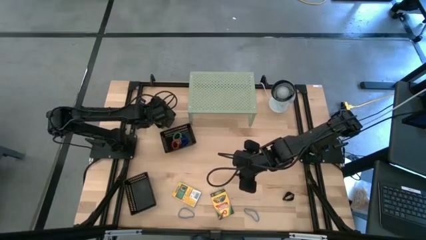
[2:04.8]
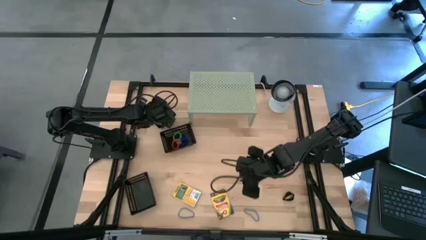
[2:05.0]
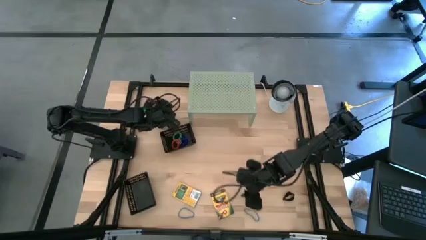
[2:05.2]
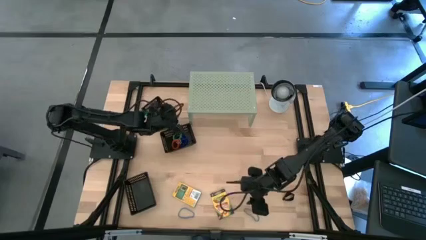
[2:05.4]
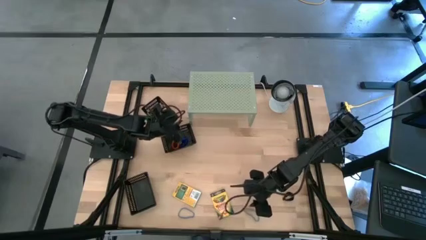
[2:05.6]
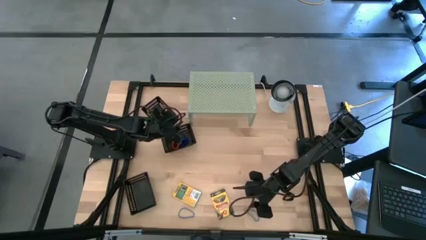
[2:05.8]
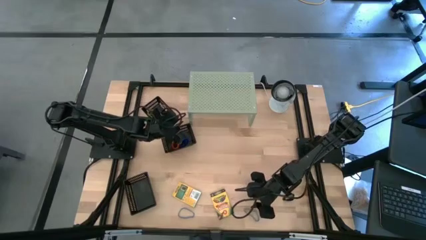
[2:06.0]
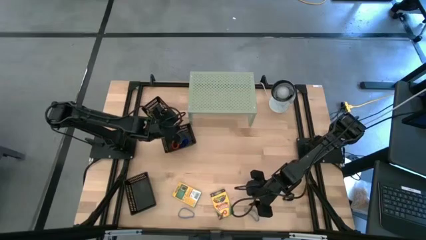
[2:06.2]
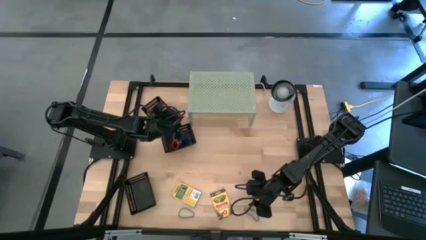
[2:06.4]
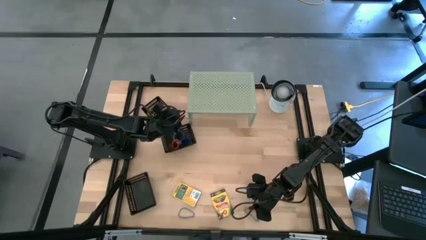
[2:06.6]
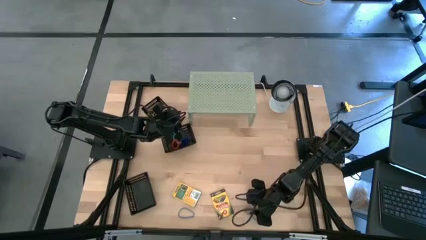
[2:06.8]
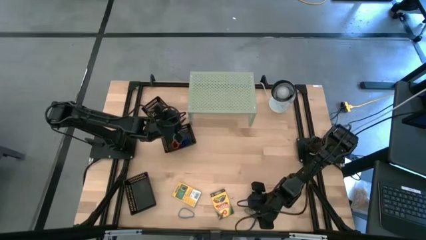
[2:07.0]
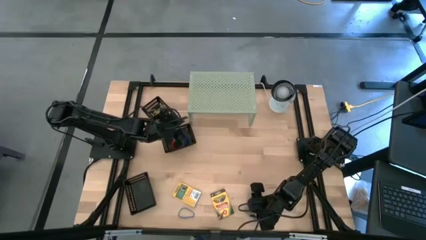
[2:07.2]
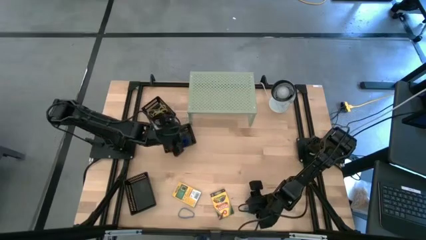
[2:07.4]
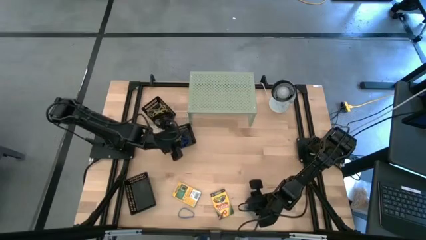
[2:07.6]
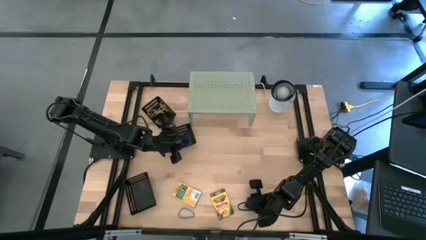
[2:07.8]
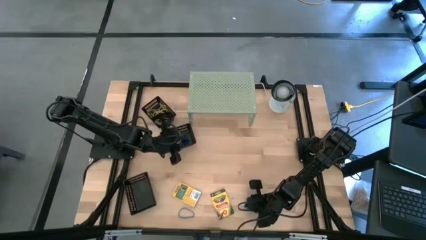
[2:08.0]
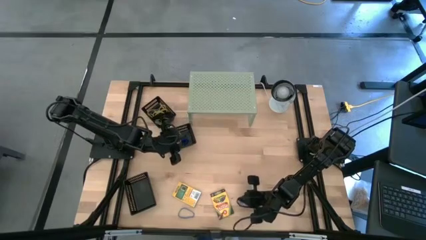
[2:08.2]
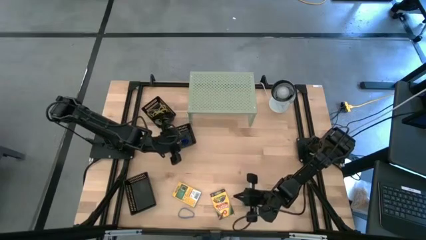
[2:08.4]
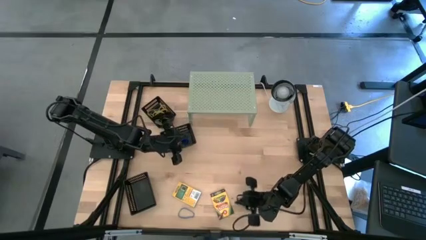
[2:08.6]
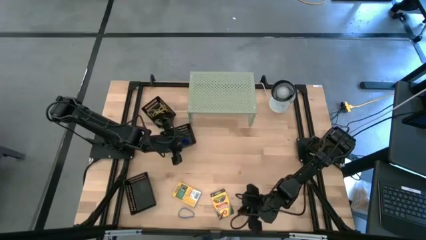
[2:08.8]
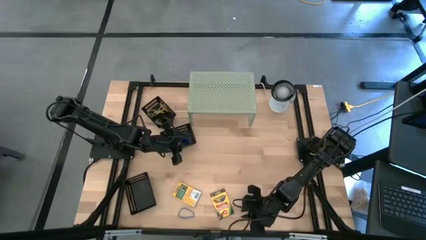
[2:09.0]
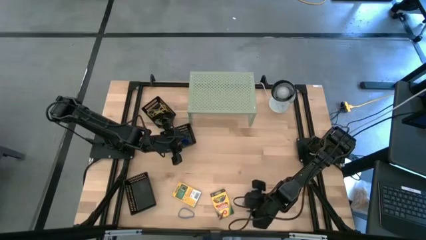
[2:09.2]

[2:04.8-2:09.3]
Task: Pick & Place Office Desk Supplies
Put the blue rubber band into the top black bin

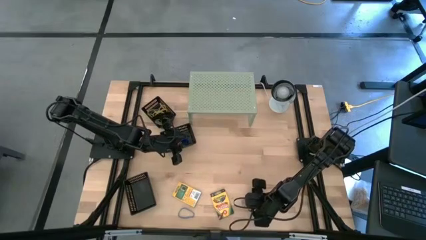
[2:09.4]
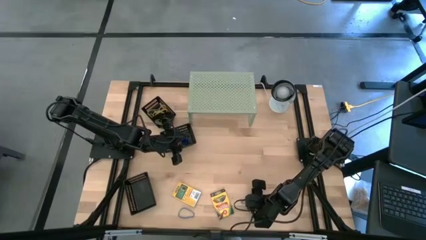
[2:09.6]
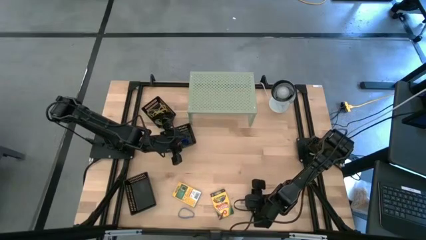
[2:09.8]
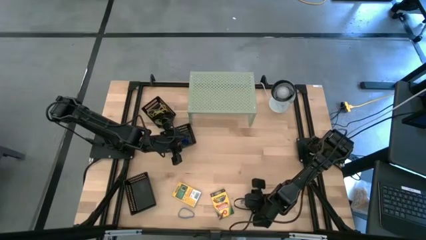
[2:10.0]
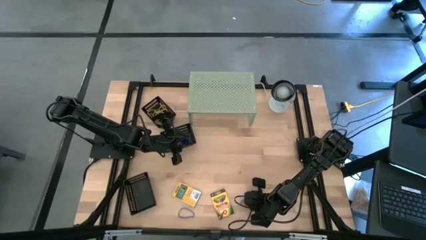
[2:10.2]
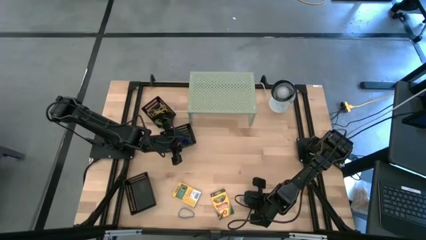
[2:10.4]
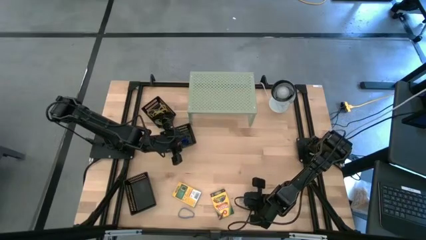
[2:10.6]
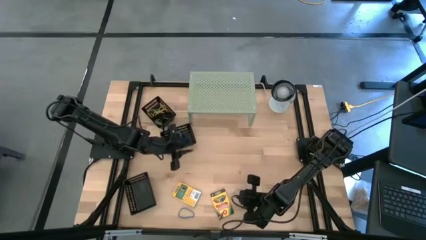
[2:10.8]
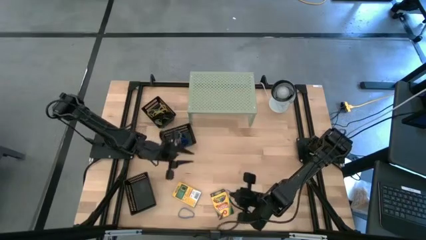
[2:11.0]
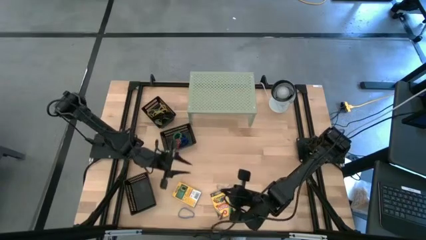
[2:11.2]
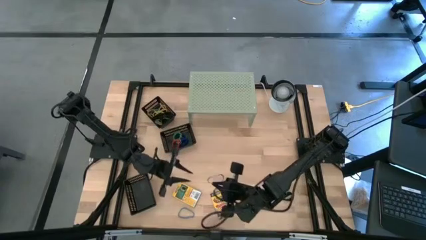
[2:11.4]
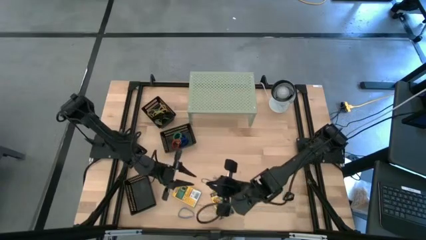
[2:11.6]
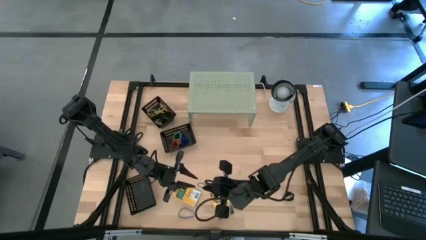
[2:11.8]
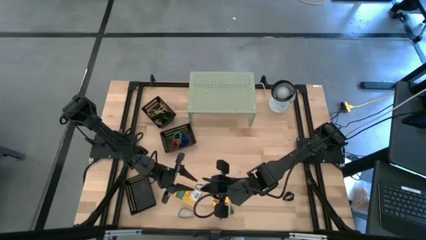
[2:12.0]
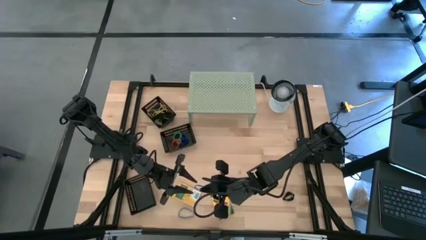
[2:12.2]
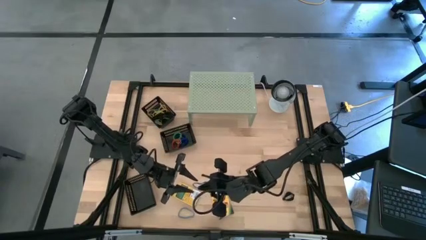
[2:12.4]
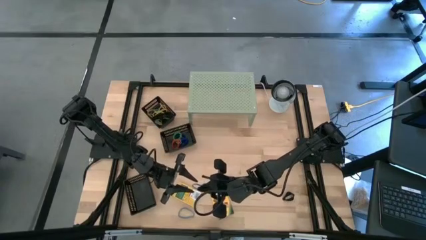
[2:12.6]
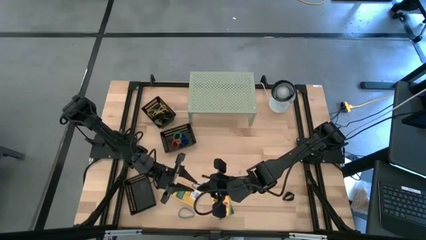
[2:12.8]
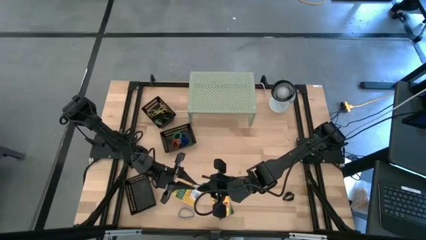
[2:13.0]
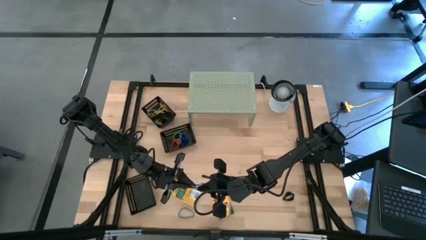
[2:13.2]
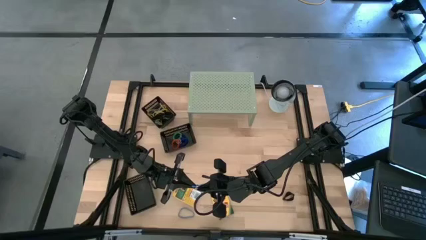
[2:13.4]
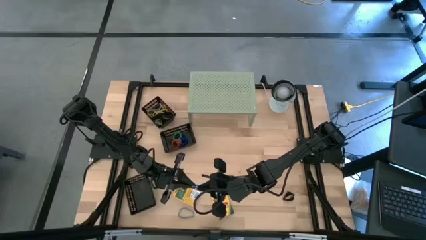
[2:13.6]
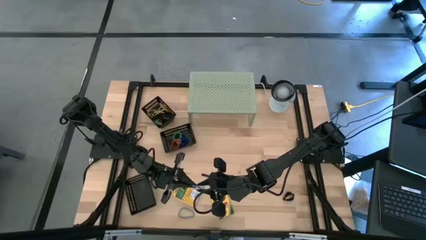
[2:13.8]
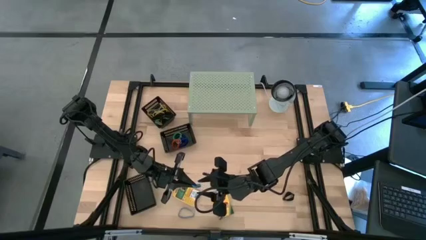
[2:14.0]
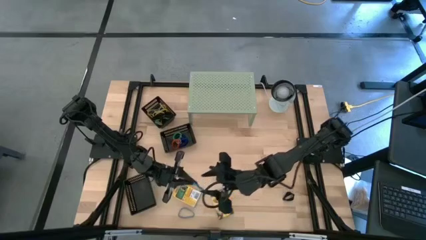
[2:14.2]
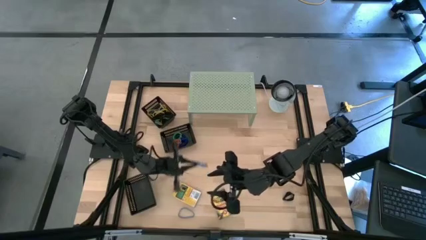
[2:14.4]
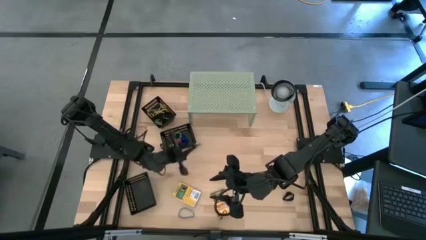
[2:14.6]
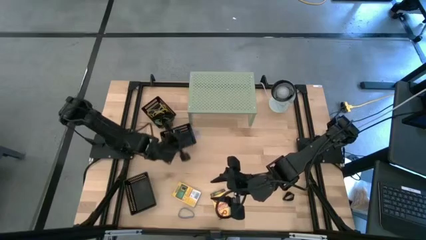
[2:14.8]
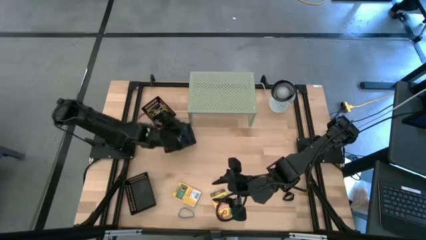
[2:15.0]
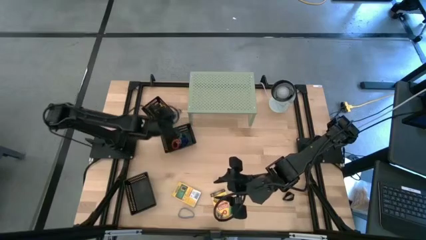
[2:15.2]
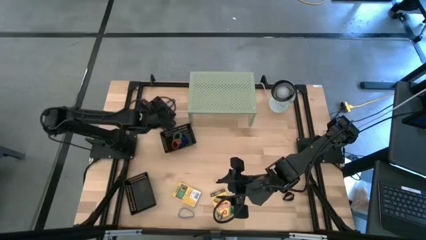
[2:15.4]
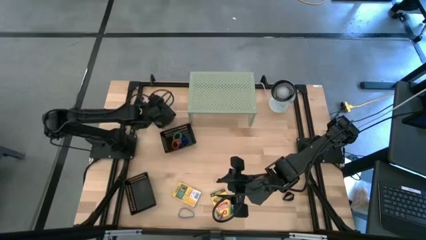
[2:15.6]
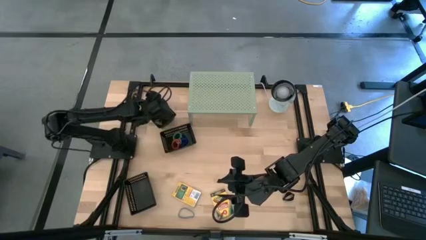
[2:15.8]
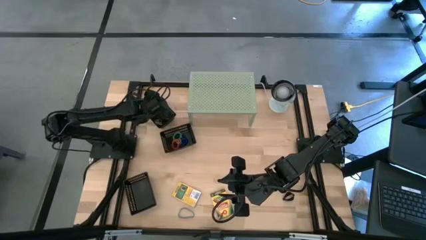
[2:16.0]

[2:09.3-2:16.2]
Put the blue rubber band into the top black bin

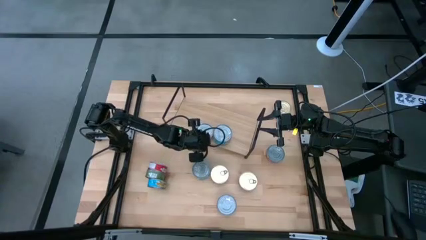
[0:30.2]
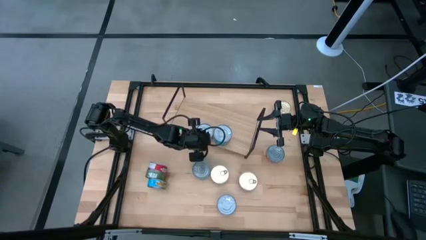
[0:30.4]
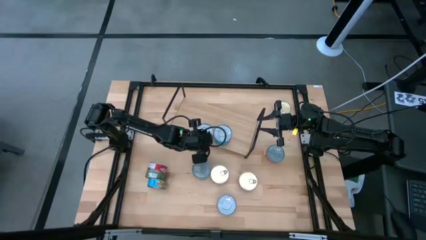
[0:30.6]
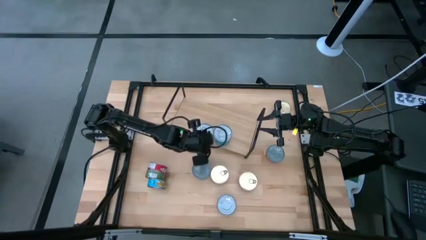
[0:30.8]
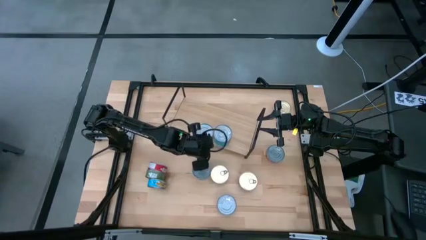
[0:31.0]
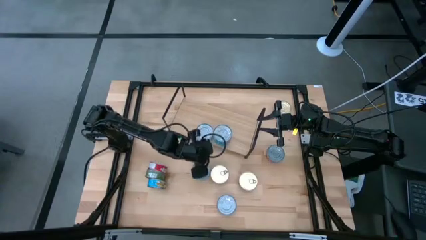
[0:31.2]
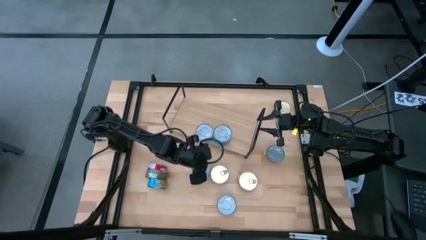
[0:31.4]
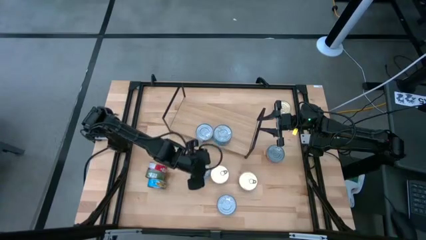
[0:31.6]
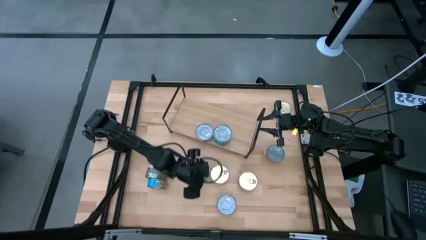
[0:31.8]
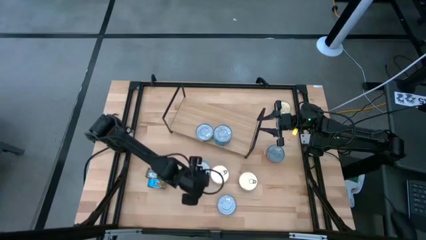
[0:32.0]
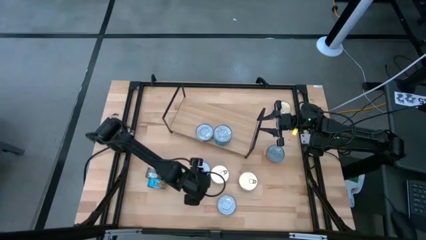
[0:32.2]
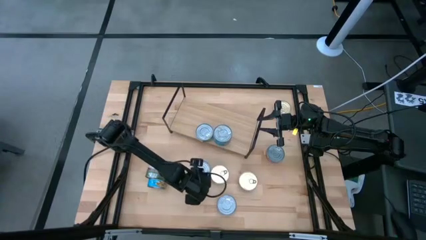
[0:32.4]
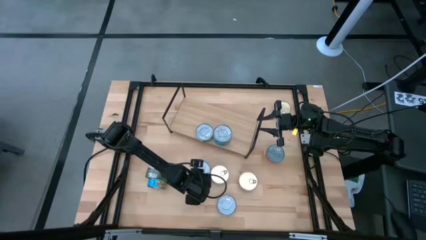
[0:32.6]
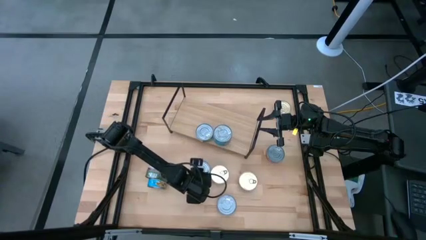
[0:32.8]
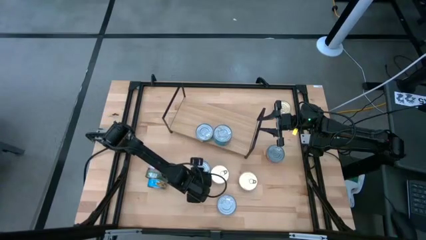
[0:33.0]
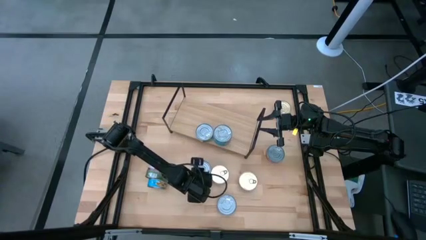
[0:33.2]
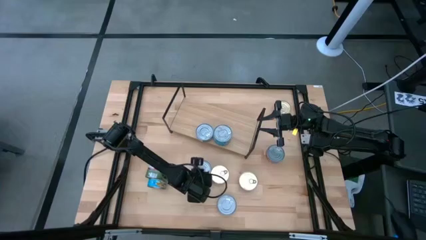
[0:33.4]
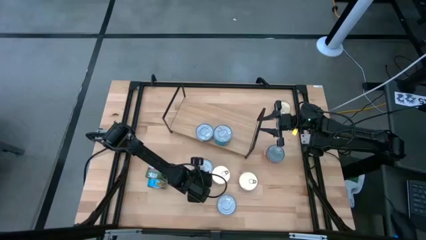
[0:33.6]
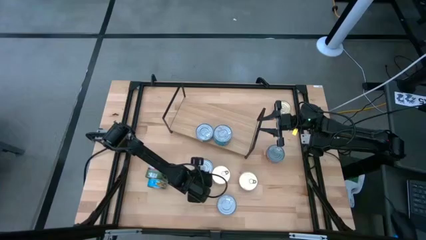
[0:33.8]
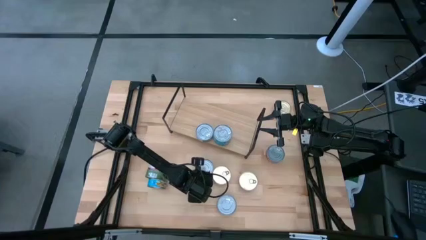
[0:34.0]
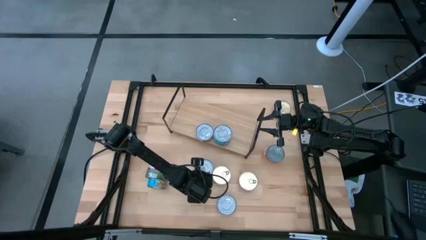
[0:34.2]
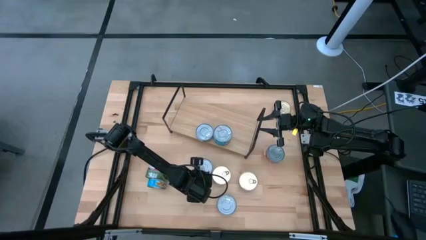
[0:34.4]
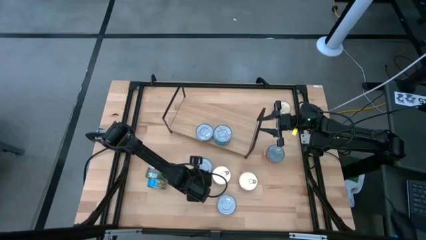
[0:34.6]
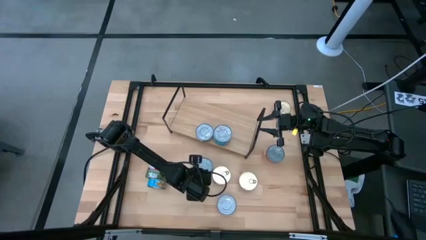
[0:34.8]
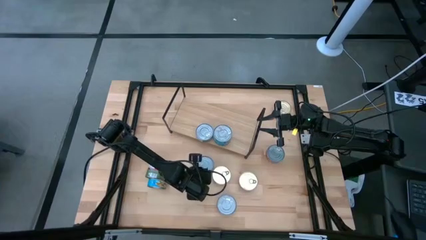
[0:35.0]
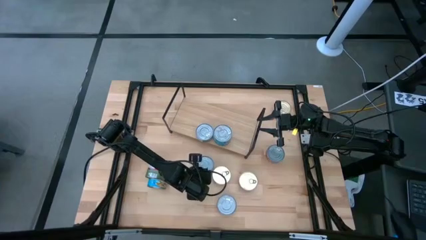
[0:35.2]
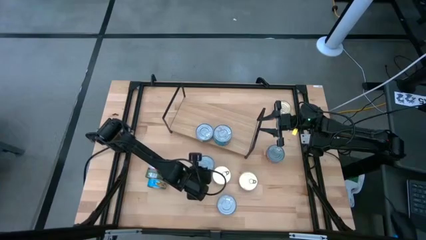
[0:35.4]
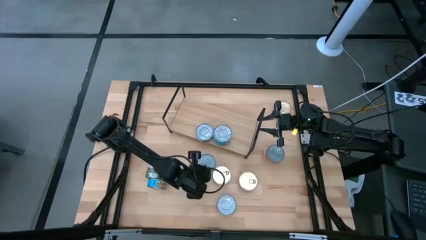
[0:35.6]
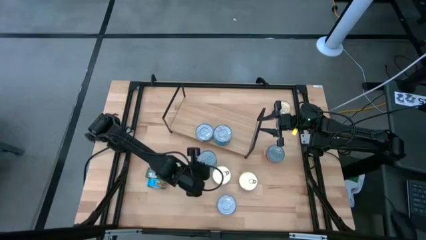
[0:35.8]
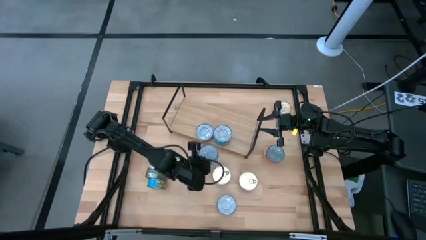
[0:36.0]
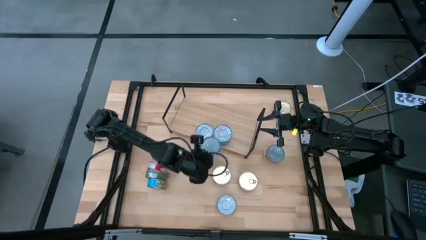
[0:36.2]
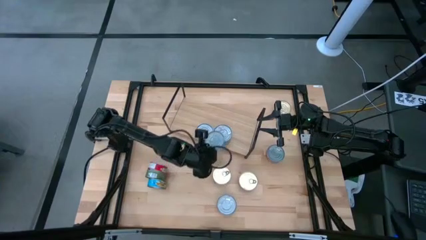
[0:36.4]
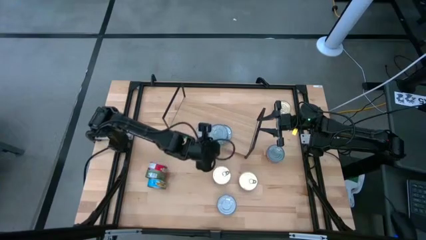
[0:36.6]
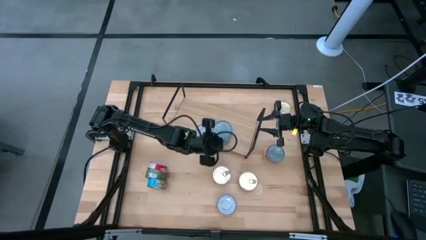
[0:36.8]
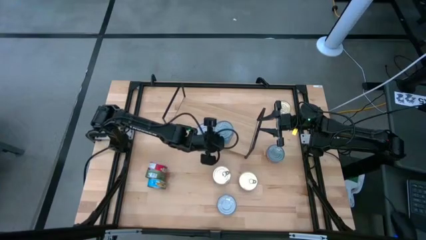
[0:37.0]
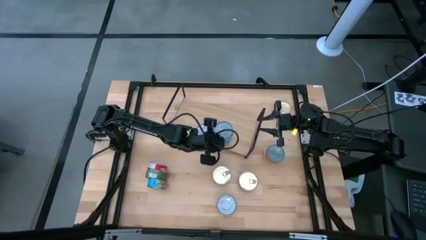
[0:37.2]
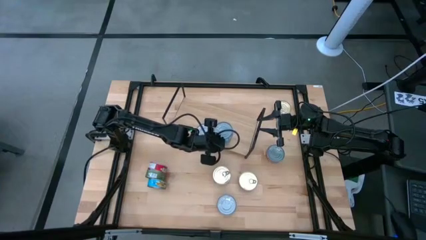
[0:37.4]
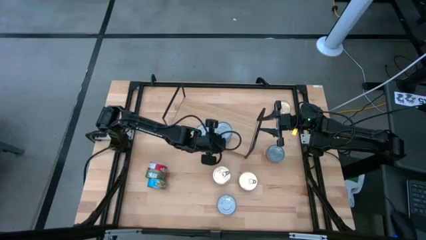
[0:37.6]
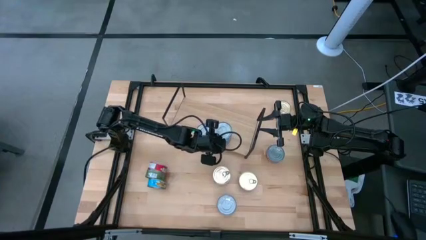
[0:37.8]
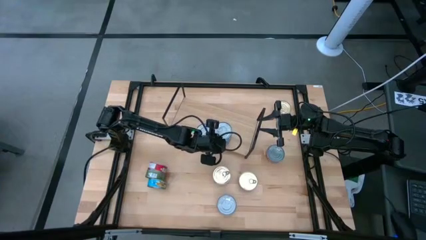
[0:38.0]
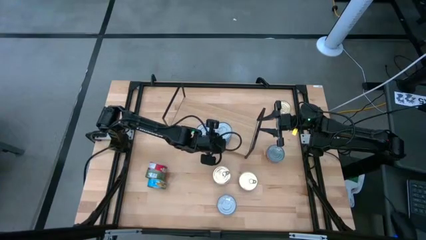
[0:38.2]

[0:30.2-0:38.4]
Task: Stack canned seafood by type on shelf
Stack the yellow-blue tuna can on top of the yellow-blue tuna cans on the shelf
